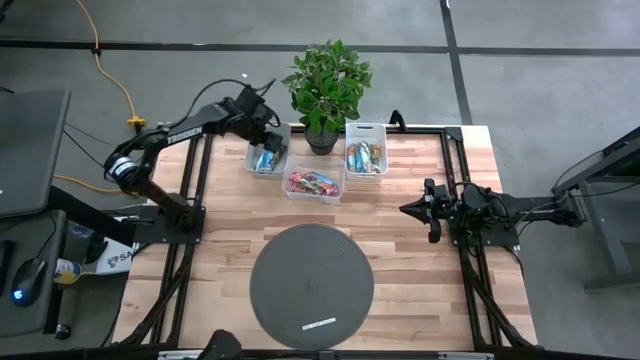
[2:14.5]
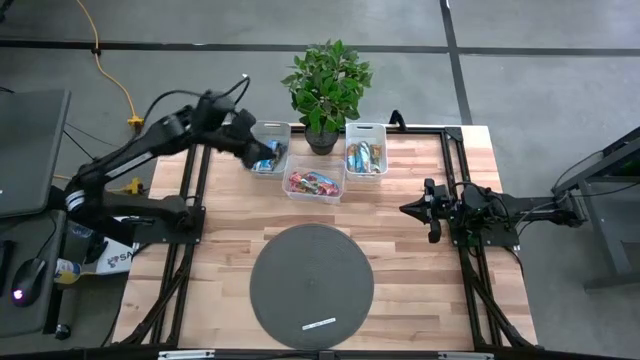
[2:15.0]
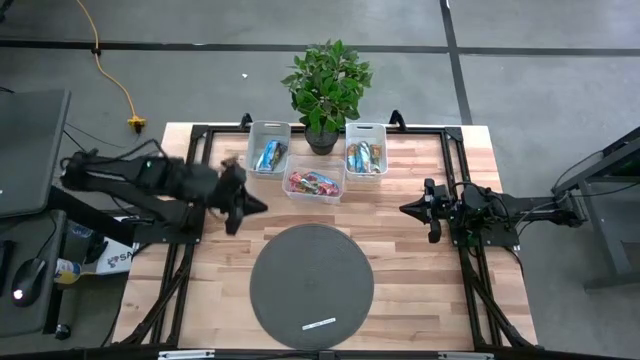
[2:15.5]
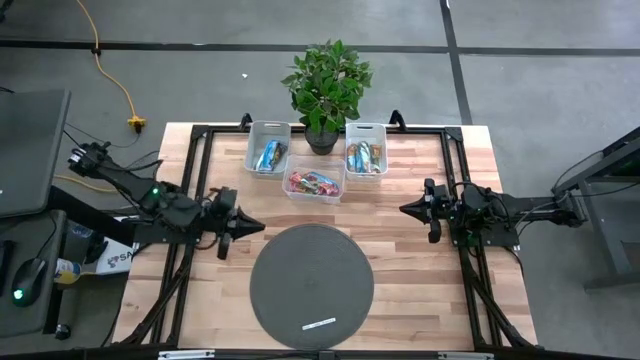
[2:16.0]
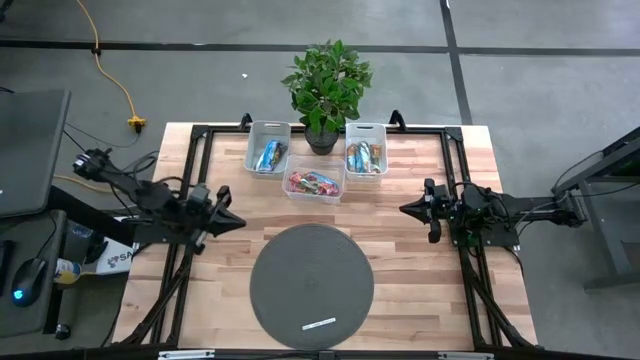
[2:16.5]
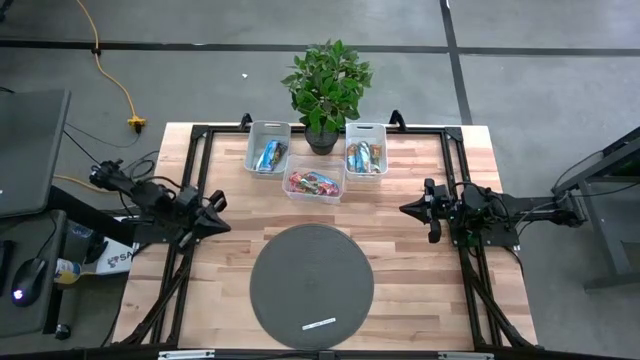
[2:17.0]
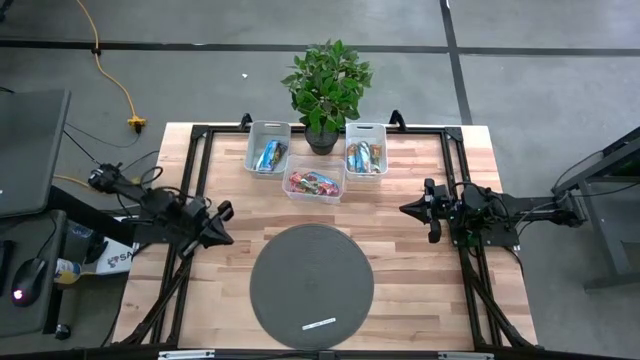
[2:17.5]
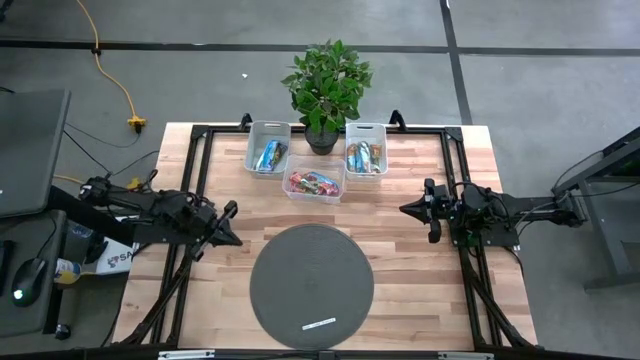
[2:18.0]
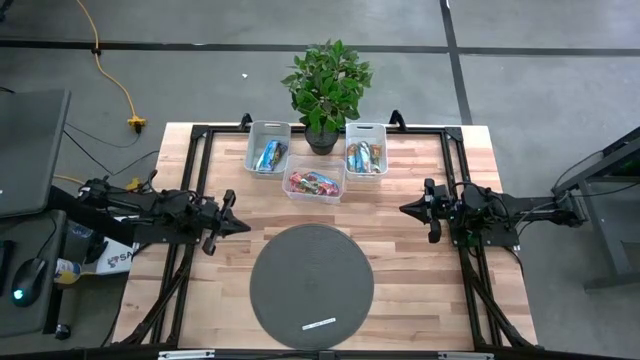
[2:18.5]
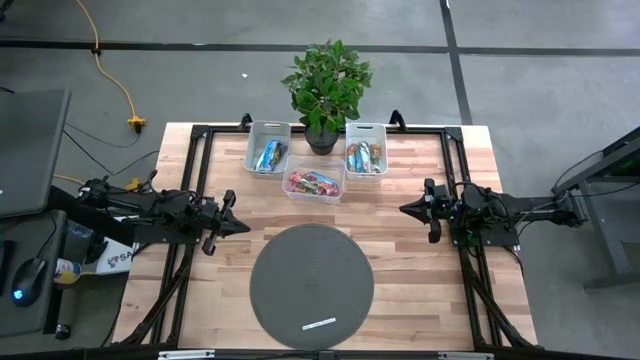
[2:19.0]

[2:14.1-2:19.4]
Task: Pick and place Granola Bars by type
Return to Home Position

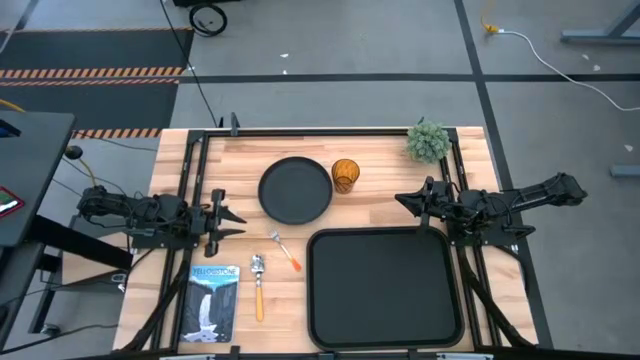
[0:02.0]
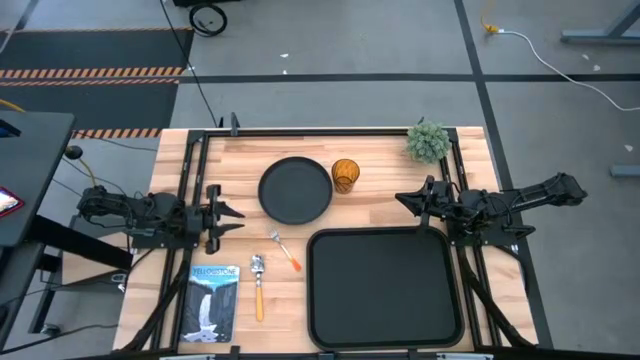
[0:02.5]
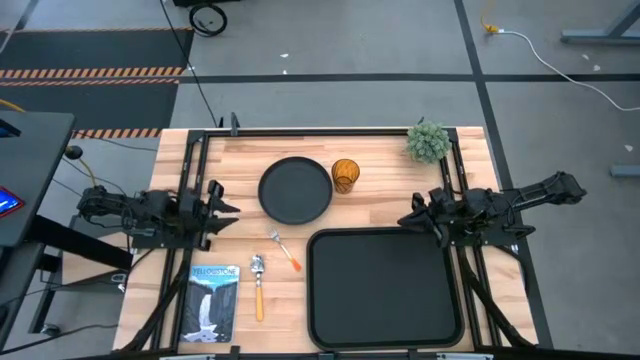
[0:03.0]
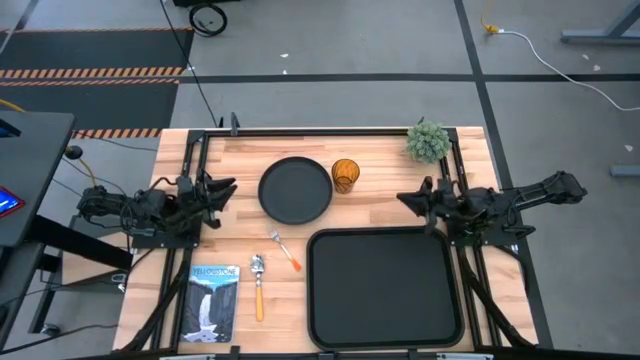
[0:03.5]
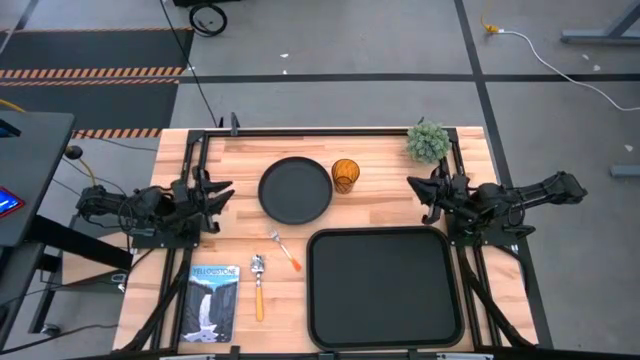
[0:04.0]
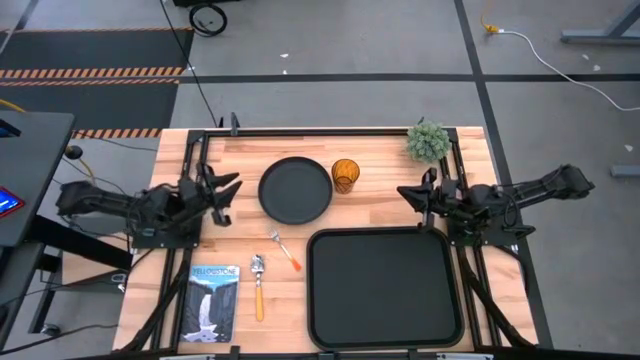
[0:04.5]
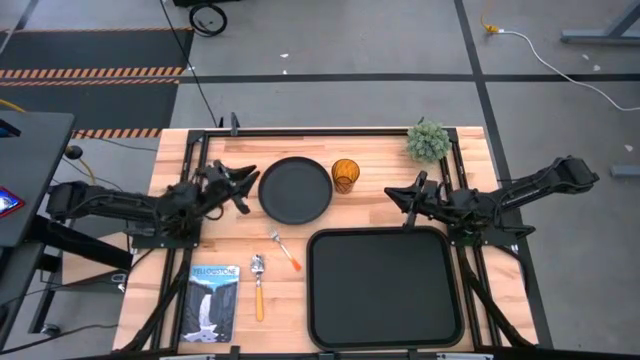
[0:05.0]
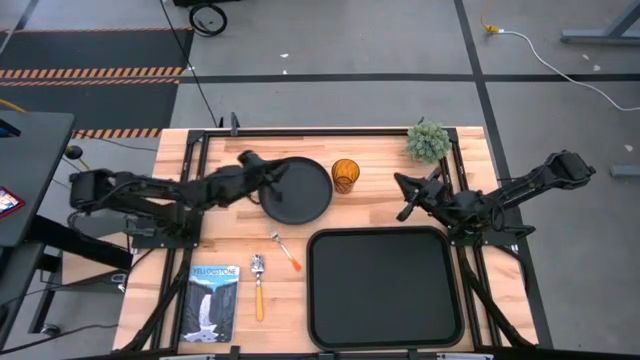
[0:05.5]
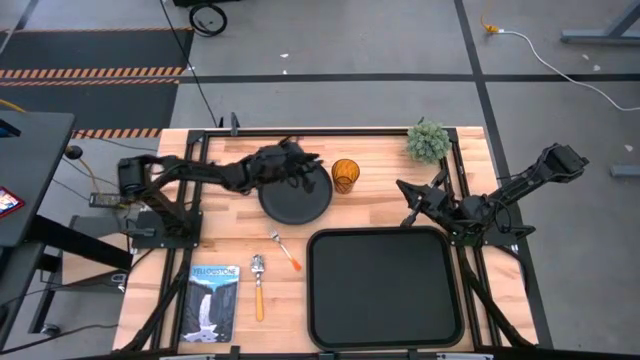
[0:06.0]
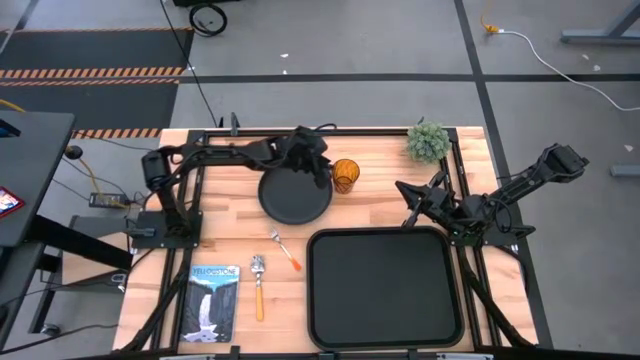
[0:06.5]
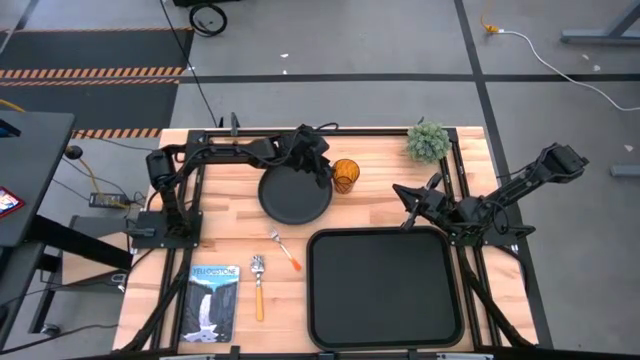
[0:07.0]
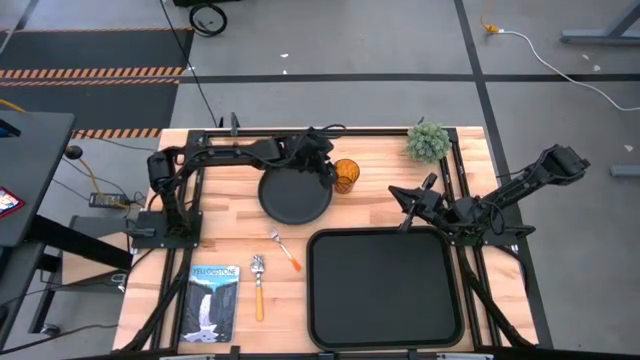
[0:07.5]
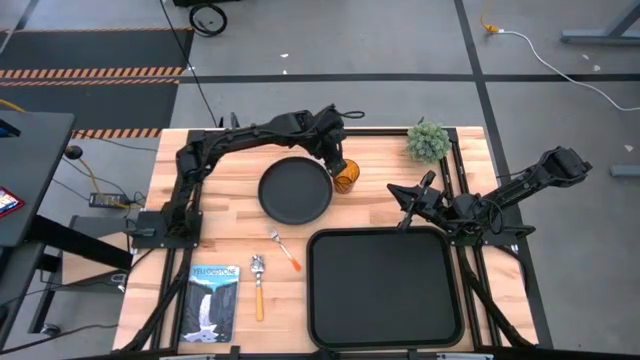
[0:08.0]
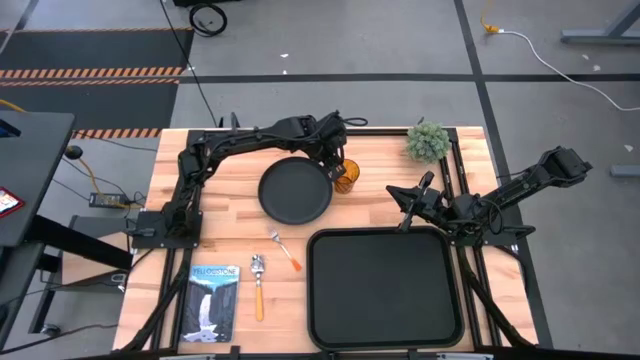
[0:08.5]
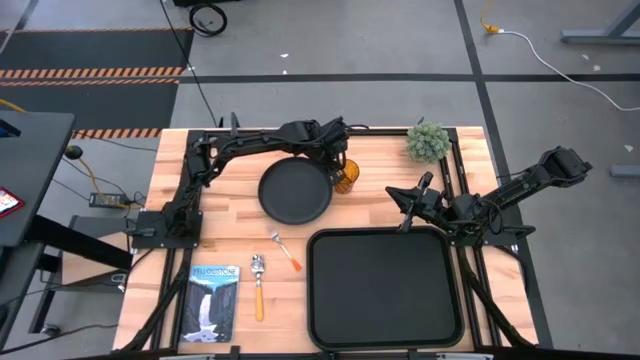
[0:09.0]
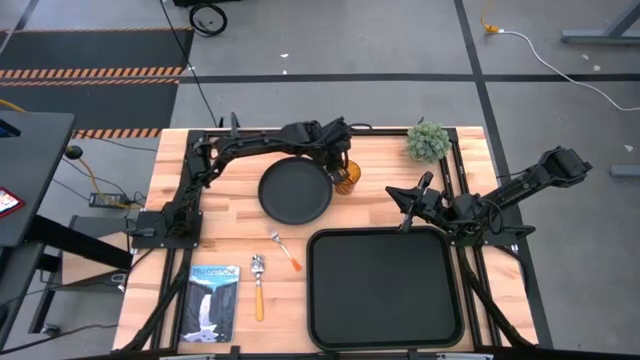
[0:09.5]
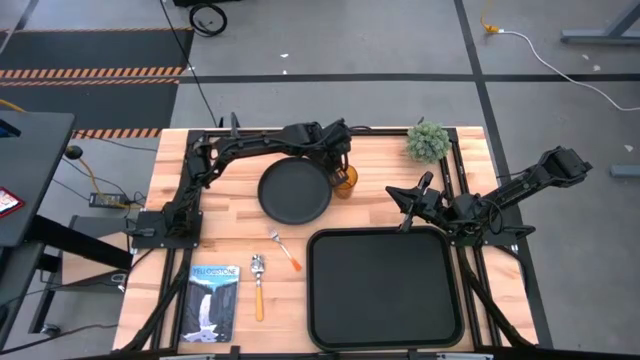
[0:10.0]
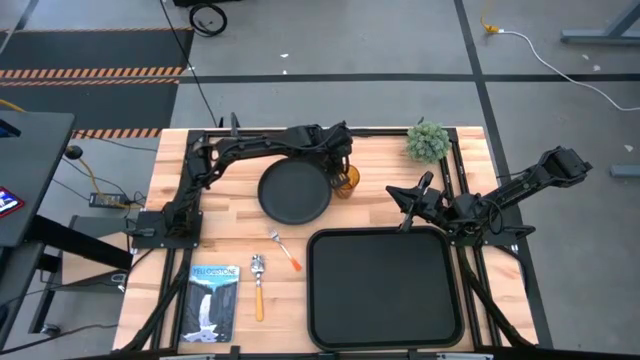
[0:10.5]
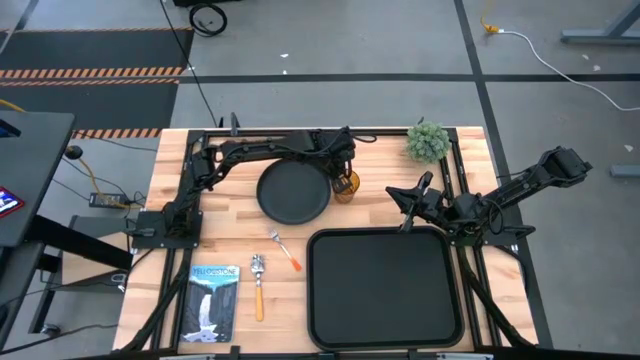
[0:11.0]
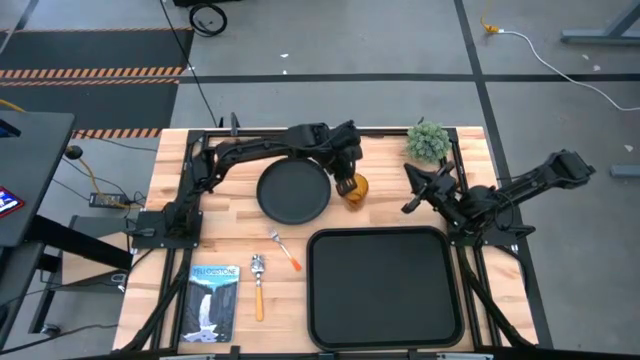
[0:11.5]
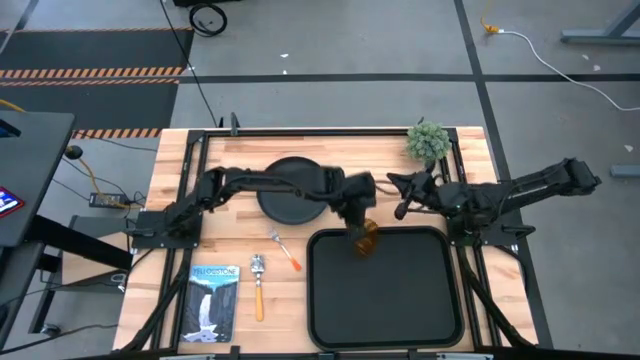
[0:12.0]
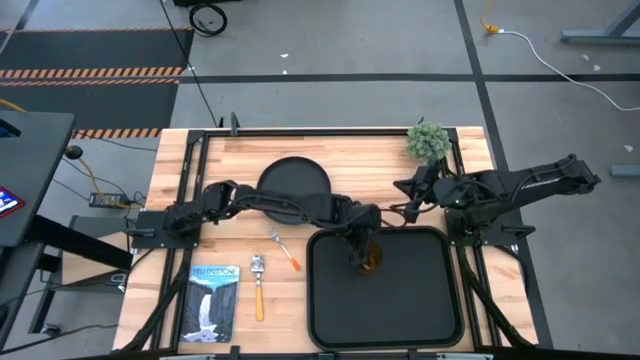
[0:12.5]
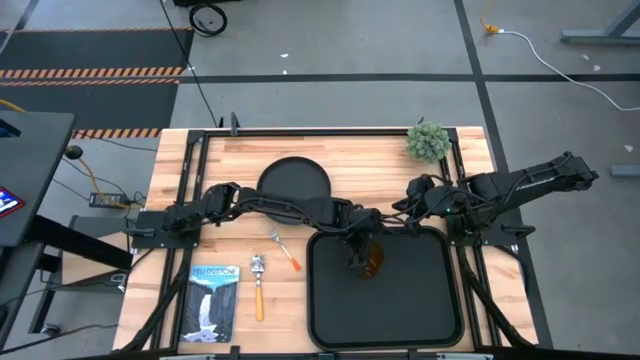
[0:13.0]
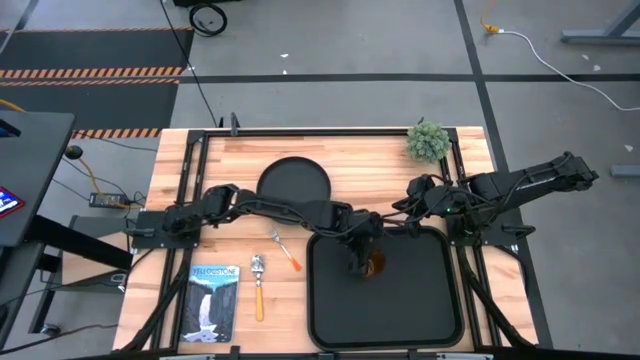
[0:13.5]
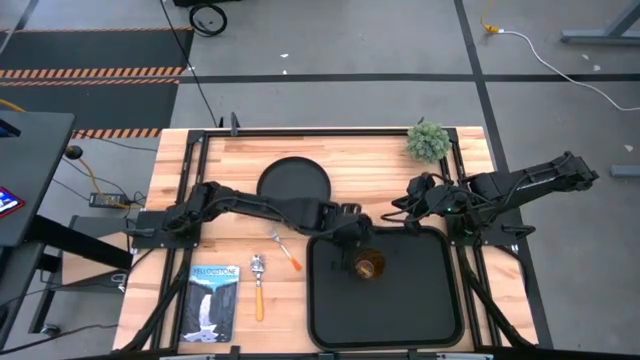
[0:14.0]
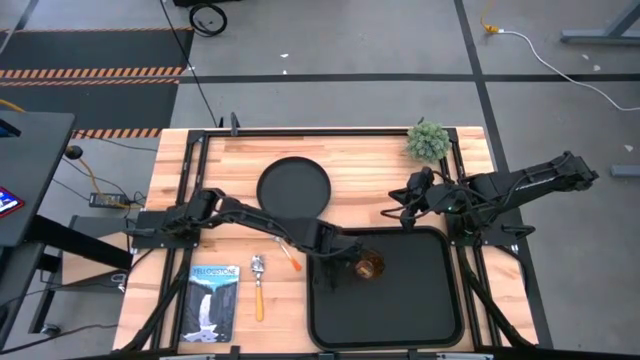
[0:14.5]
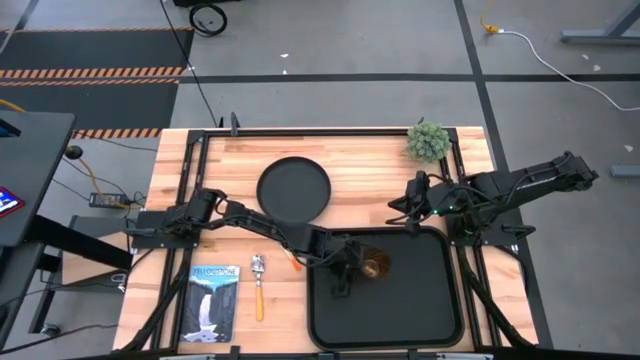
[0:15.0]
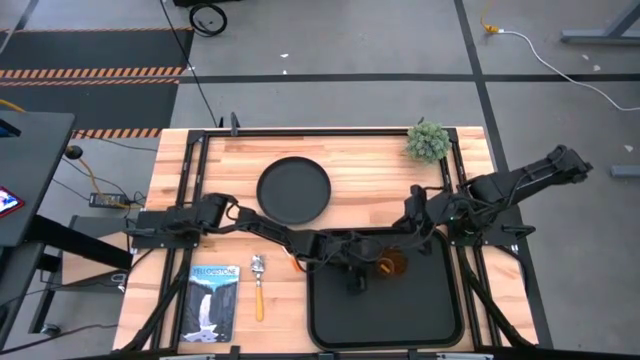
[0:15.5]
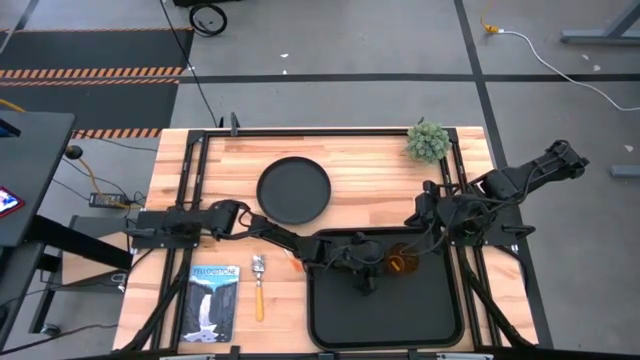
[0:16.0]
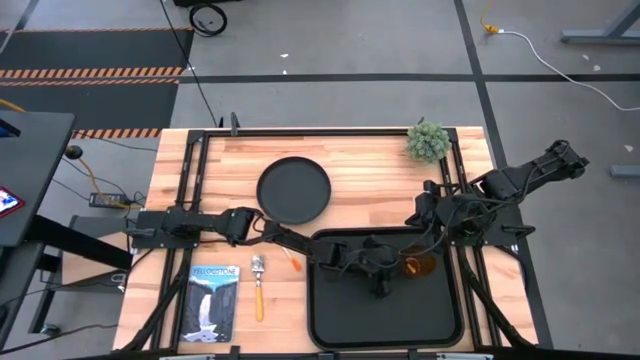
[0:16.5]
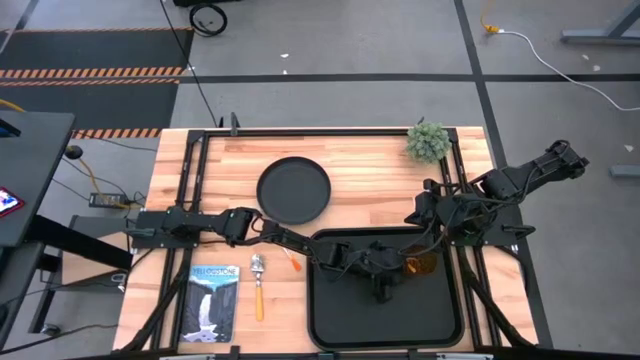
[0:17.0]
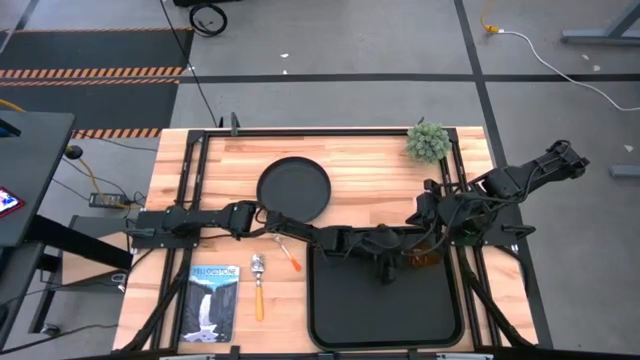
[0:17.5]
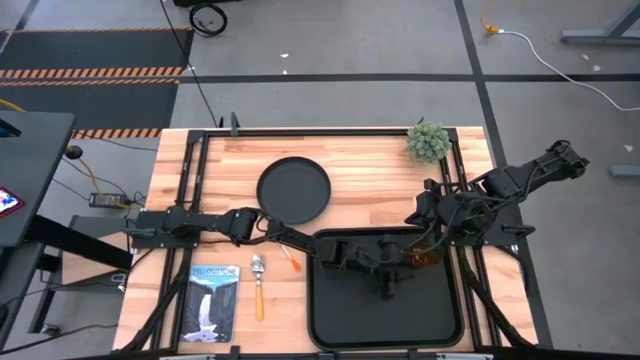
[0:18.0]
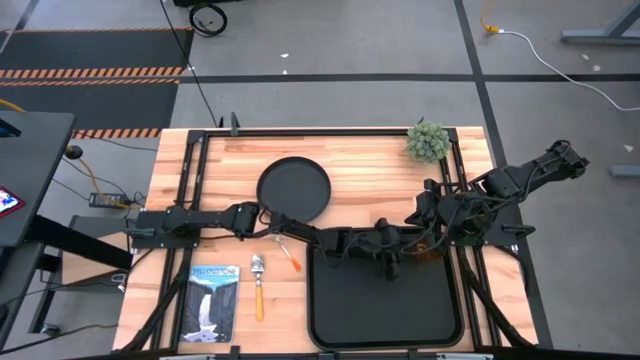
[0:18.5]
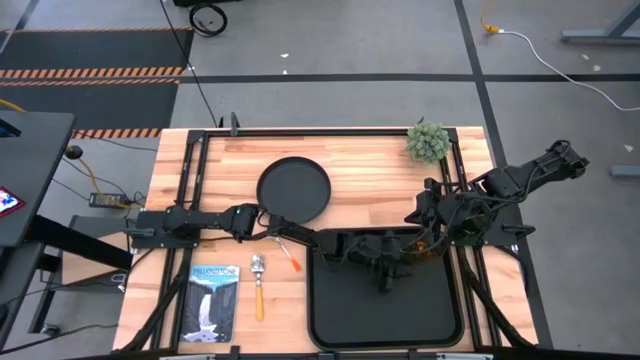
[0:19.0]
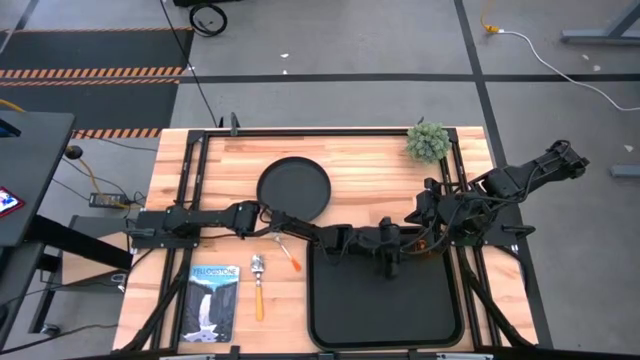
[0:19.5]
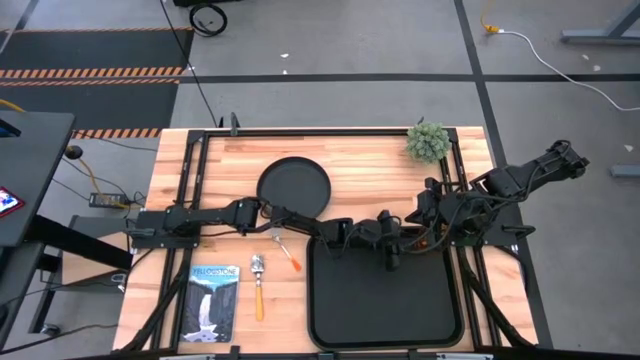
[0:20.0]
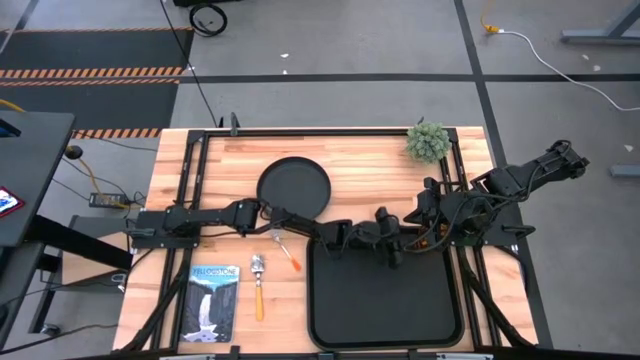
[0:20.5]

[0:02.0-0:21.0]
Task: Pick and place plate/cup/fork/spoon on tray
Put the orange cup to the top right of the black serving tray
